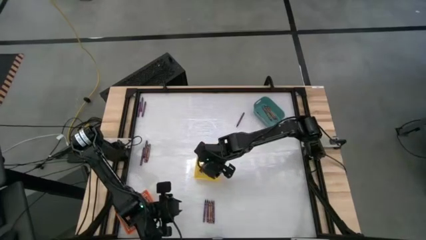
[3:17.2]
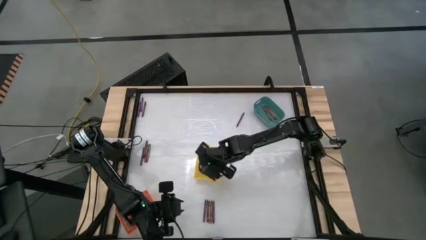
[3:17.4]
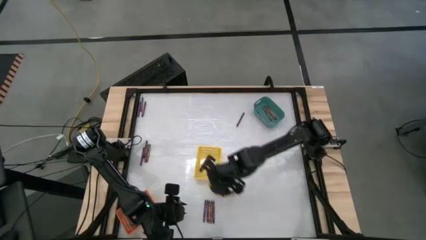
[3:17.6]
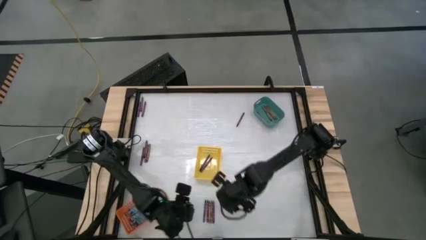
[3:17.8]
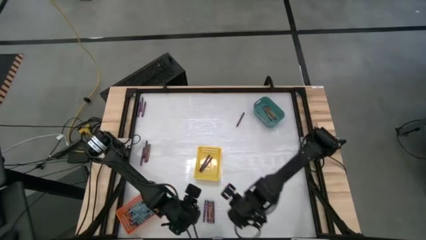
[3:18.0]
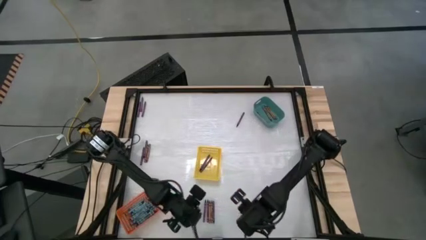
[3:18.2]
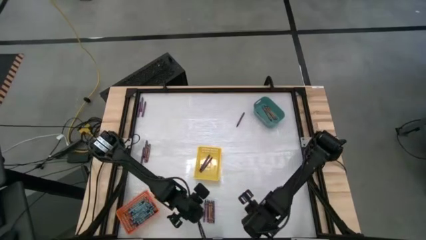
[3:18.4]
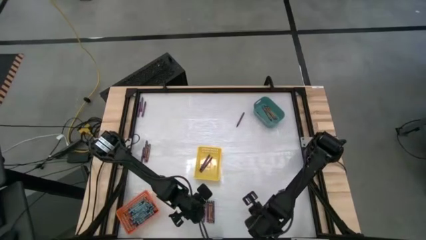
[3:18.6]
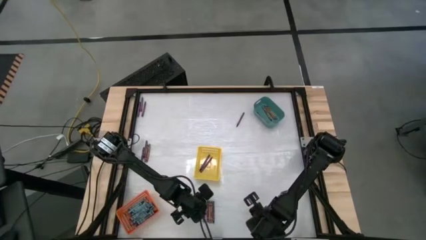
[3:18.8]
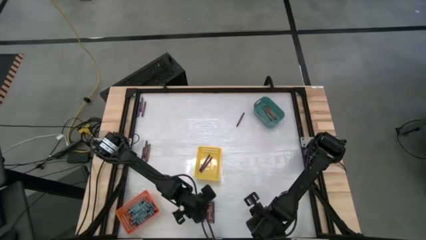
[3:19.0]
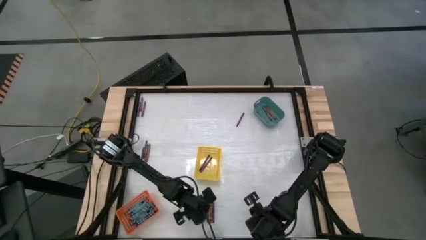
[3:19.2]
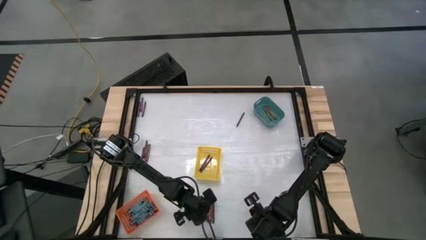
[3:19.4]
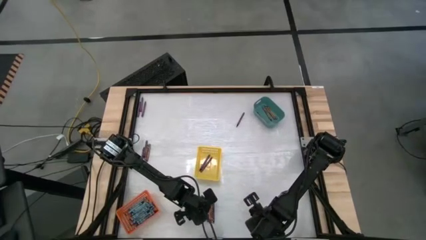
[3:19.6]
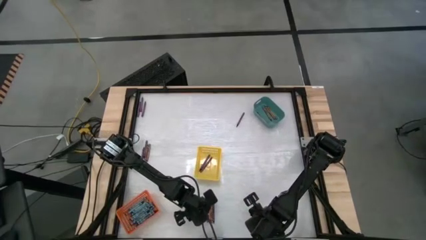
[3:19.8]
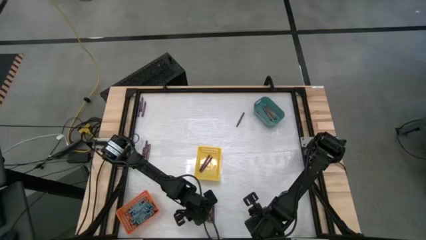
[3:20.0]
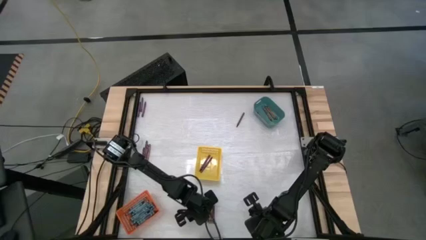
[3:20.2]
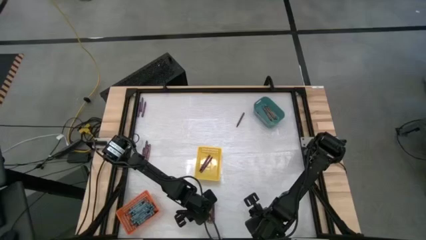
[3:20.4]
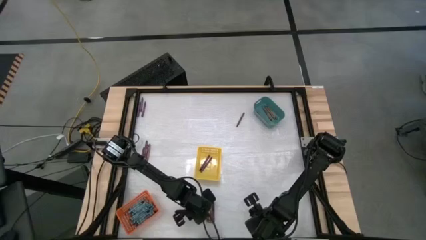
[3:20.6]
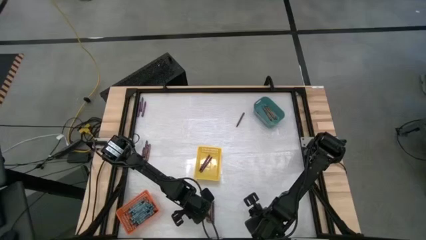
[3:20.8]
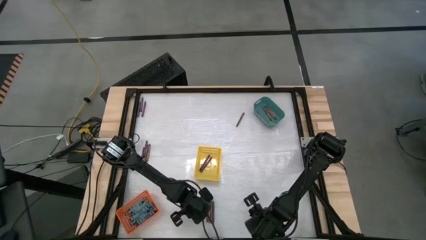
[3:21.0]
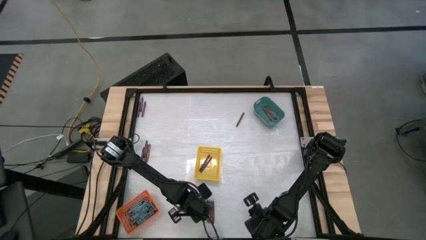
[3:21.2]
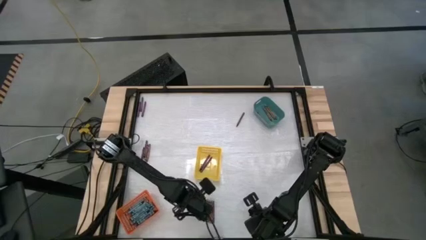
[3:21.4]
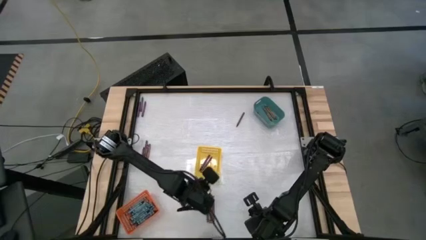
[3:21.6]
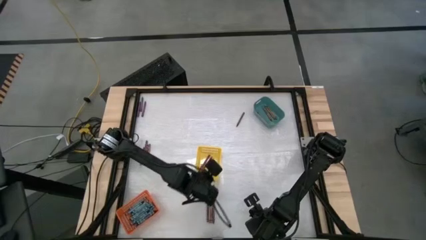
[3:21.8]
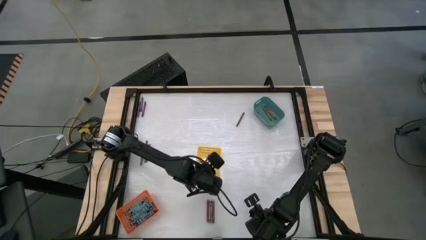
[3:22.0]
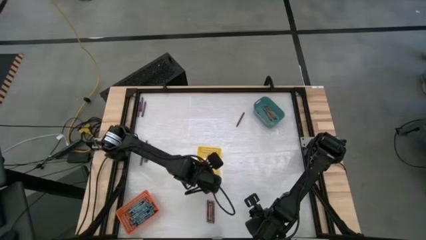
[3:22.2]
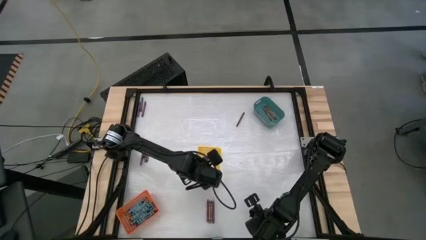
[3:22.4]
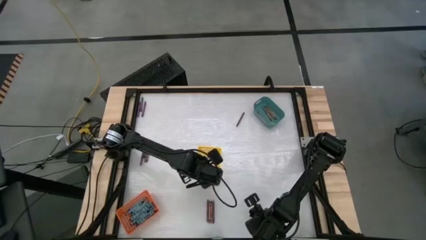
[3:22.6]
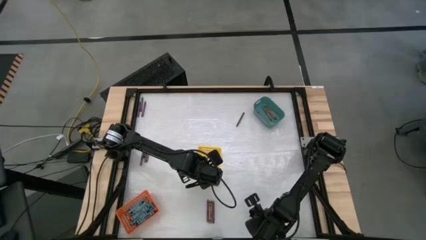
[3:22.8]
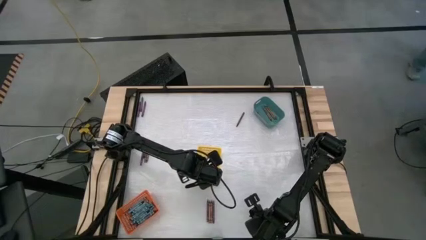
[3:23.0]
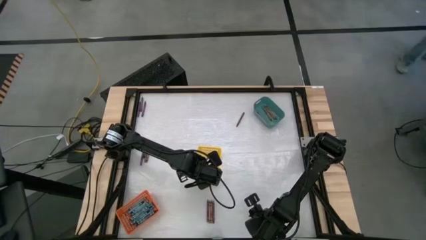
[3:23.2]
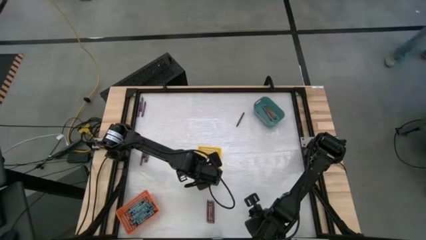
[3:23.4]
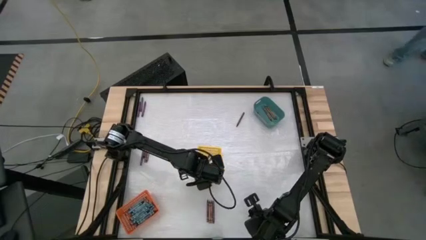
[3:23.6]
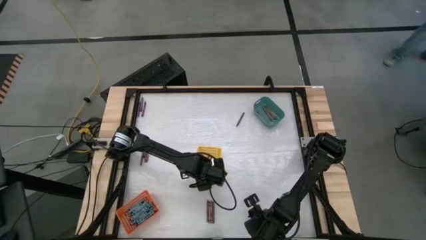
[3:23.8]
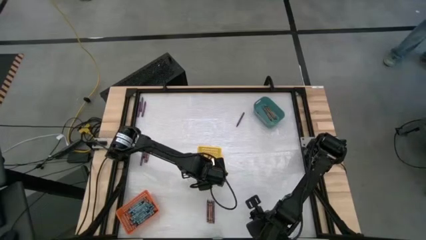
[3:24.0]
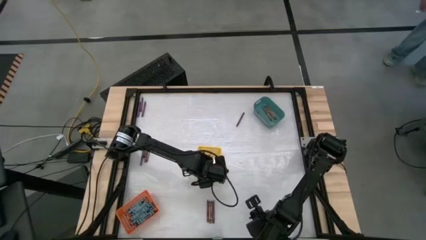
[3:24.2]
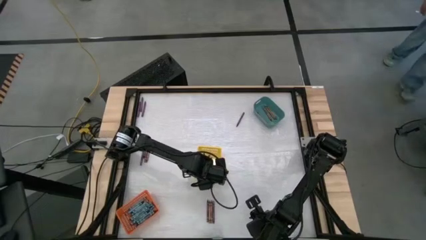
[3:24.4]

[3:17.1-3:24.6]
Task: Sort crayons
Put the violet crayon into the yellow basket

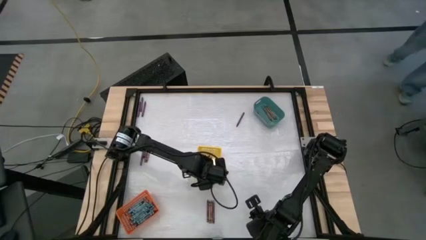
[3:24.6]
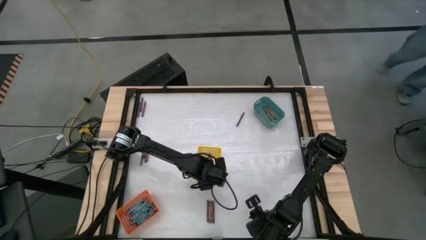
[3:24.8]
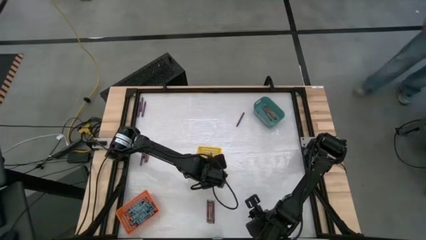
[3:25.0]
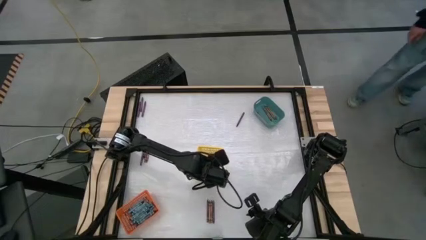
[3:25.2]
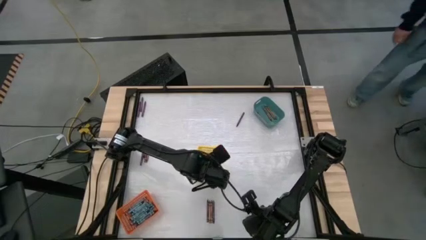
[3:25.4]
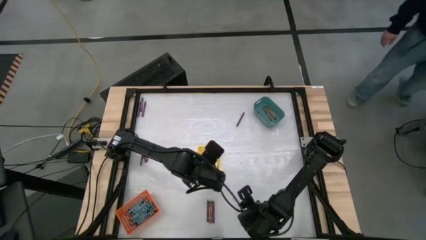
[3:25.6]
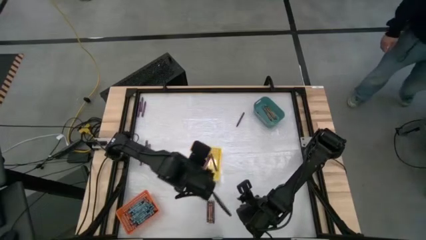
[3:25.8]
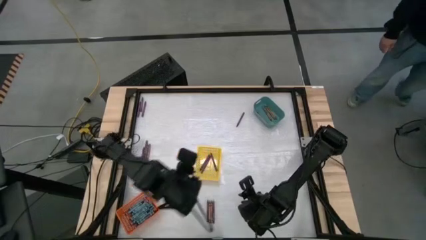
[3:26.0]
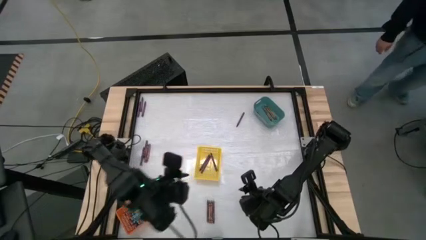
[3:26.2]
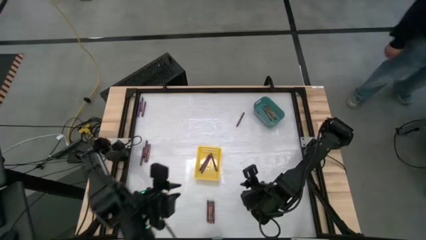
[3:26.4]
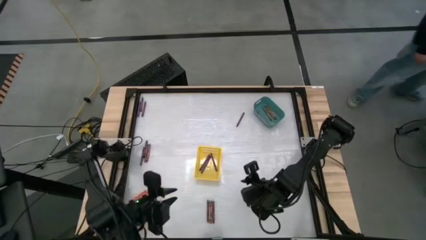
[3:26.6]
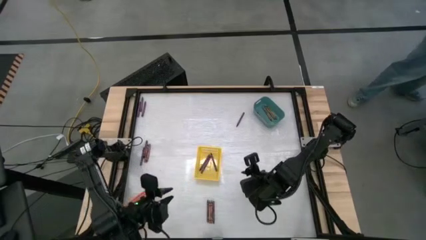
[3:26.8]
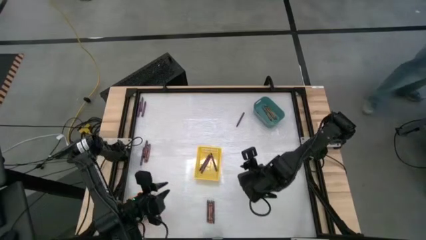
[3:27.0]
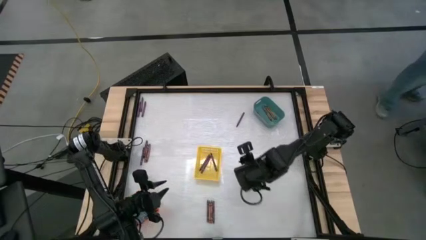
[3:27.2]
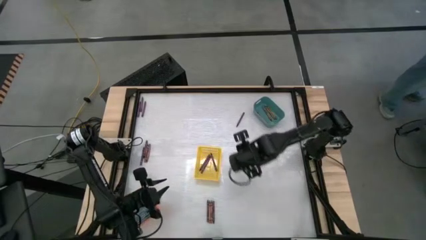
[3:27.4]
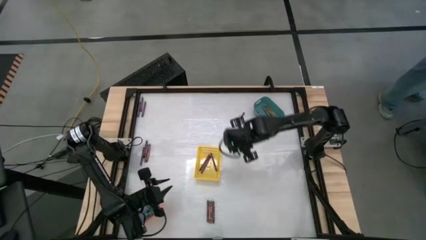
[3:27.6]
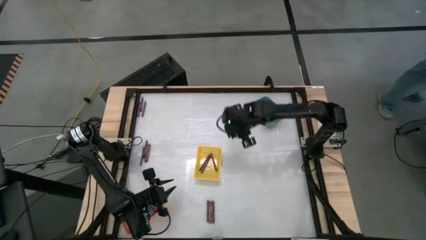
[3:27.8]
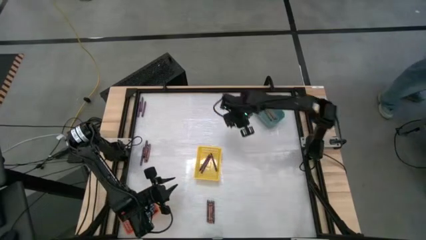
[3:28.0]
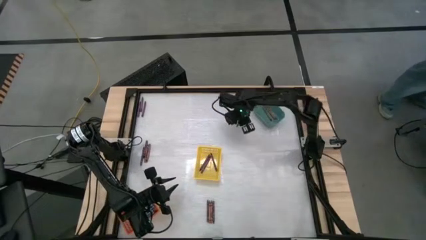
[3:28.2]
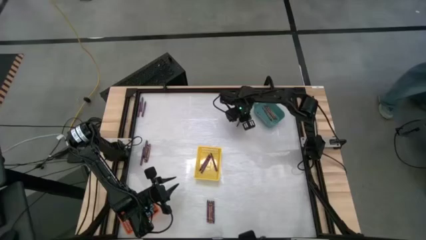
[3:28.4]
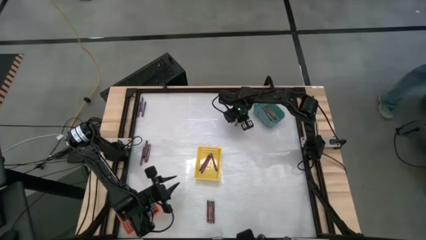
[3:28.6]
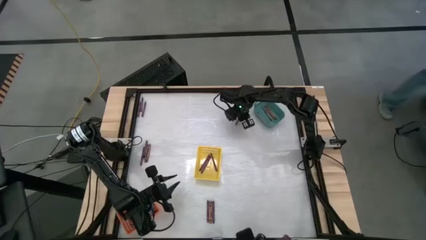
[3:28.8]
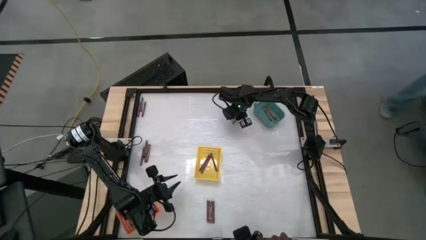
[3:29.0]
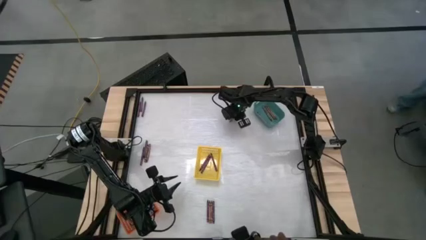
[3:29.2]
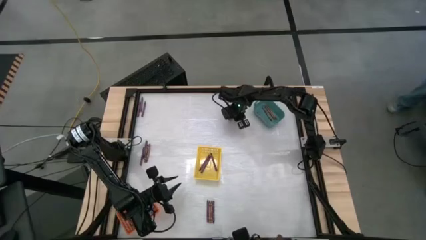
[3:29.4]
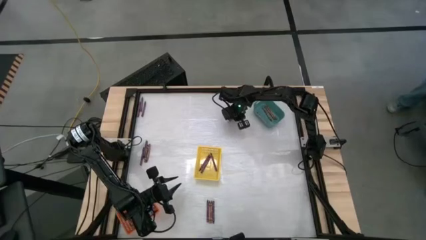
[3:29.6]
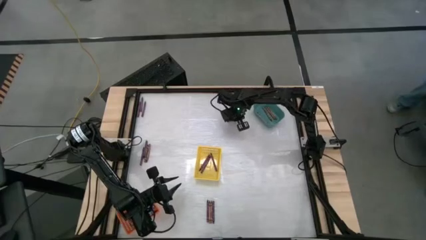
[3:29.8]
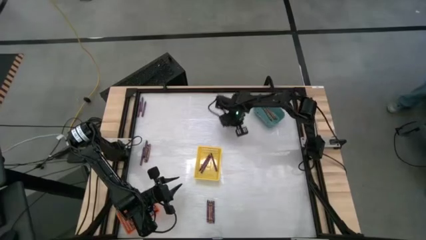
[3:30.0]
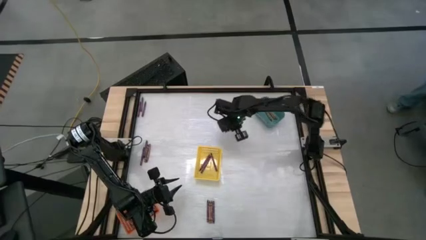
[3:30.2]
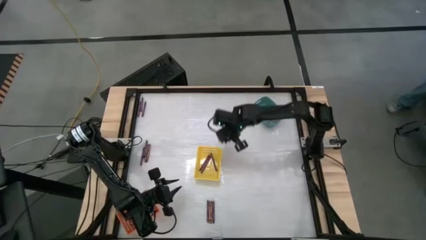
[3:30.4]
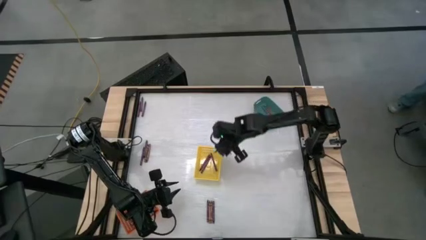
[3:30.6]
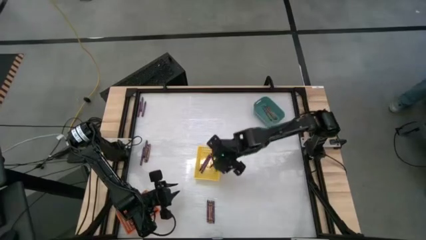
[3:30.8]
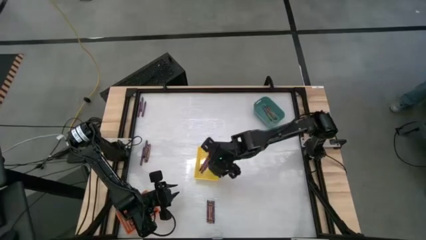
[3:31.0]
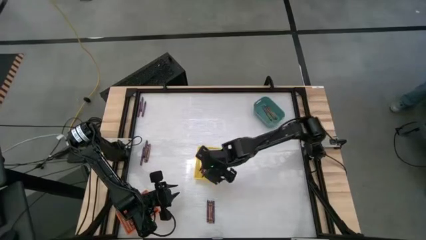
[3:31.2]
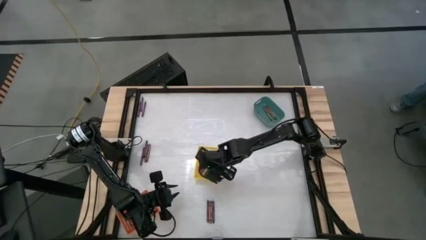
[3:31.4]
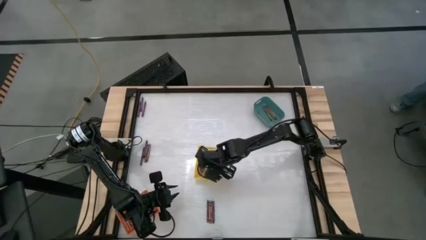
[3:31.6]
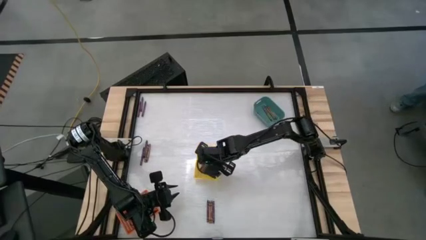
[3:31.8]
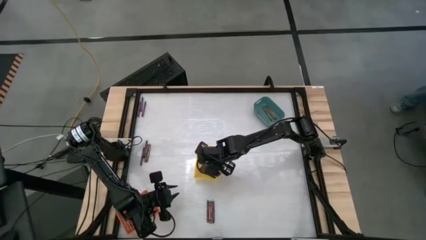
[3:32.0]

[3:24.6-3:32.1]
Put the violet crayon into the yellow basket

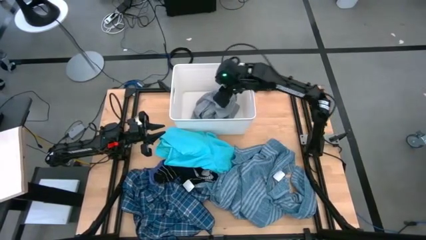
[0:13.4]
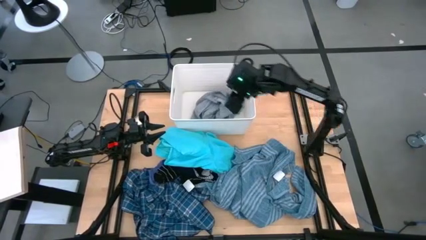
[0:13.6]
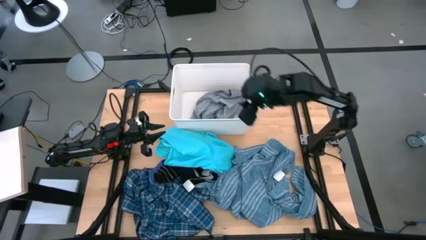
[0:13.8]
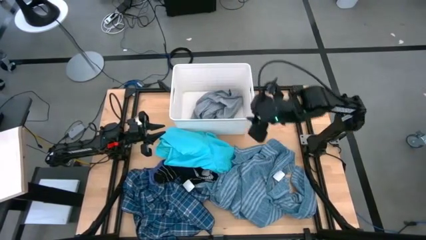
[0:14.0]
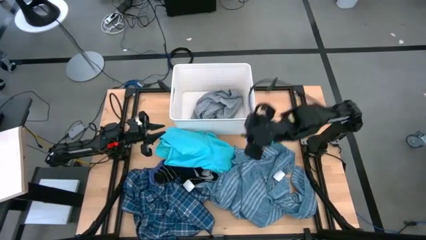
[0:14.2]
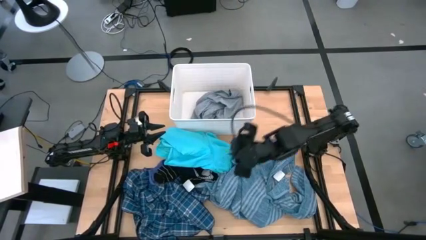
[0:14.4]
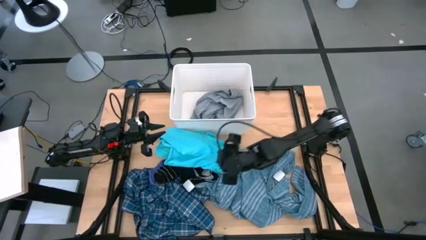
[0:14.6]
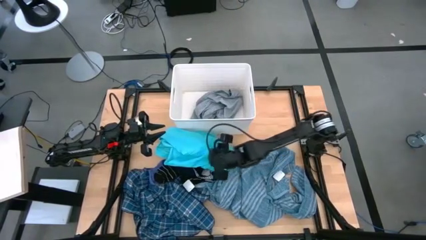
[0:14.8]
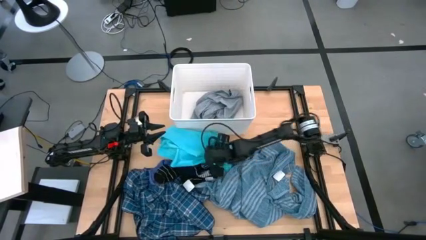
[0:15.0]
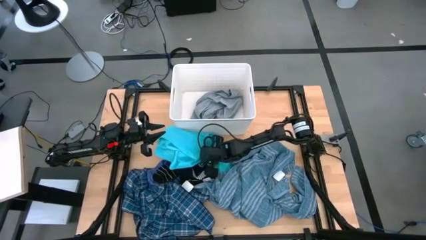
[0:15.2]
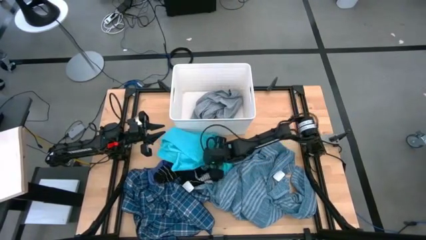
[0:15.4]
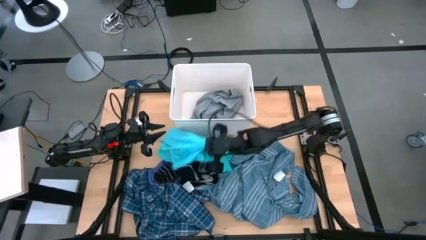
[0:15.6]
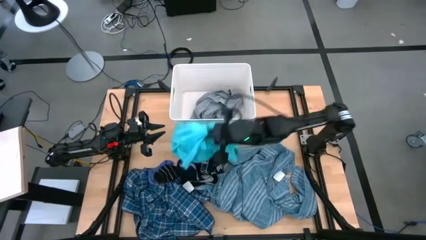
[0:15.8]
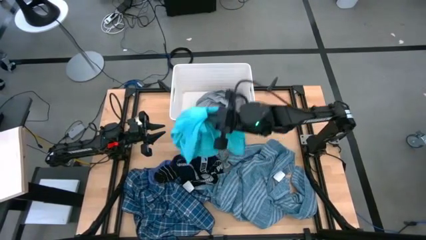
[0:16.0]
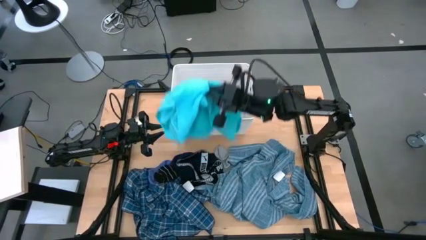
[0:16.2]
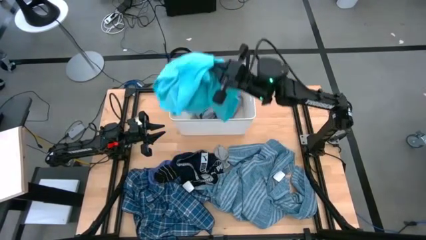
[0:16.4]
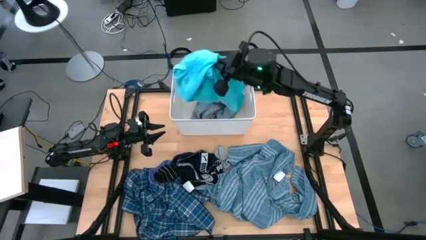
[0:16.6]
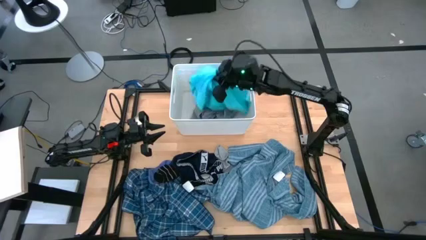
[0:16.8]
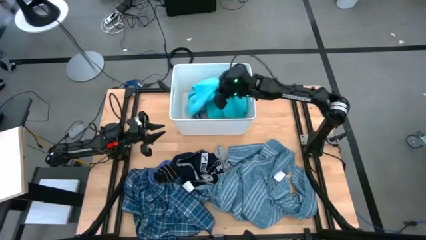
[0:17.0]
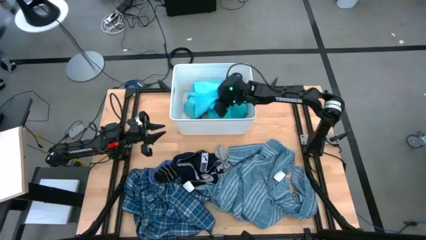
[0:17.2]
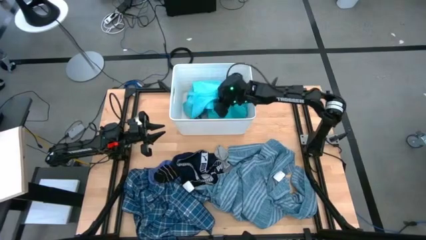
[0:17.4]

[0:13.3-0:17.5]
Task: Sort clothes
Put the blue shorts into the white bin
